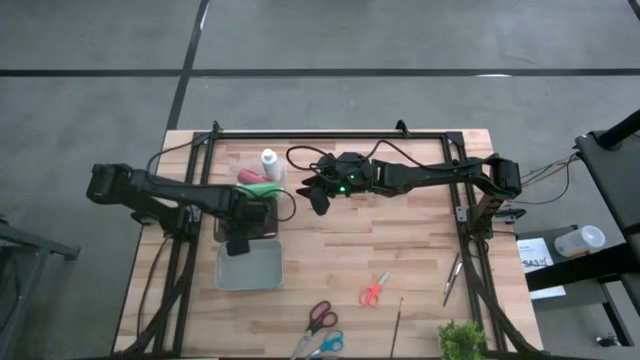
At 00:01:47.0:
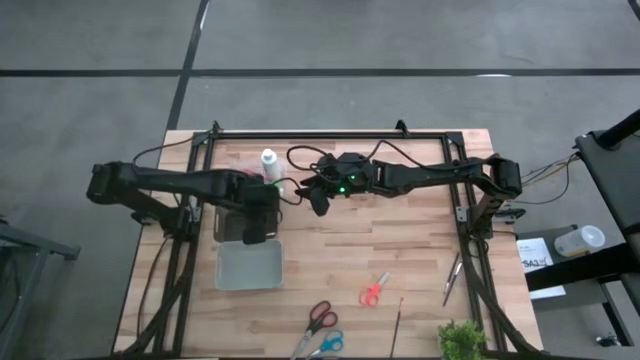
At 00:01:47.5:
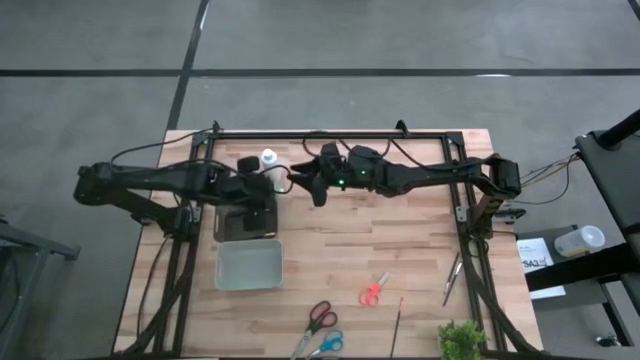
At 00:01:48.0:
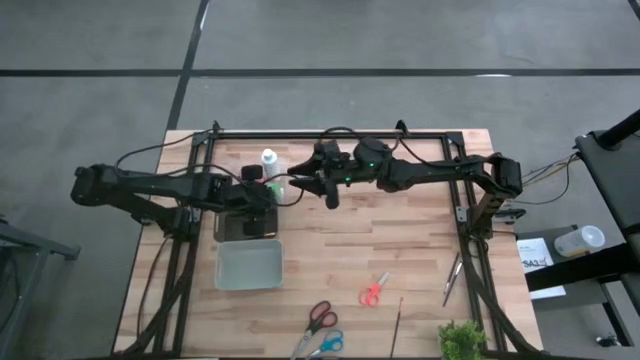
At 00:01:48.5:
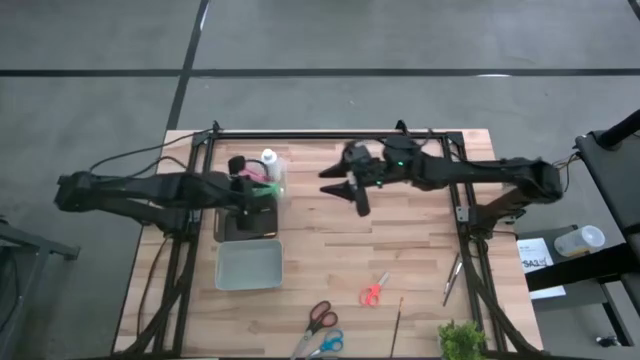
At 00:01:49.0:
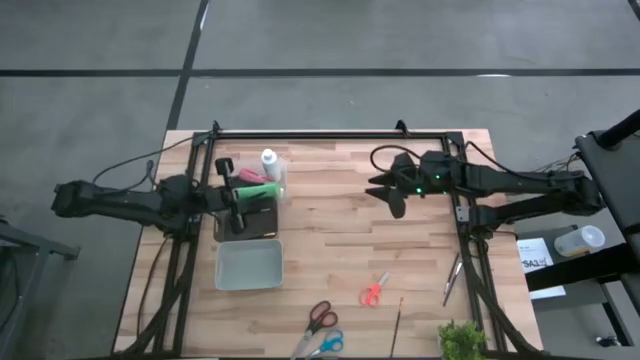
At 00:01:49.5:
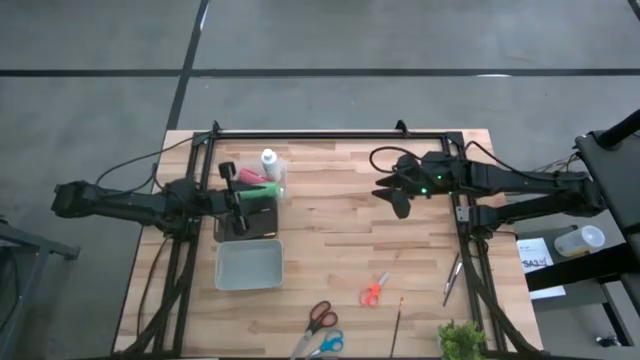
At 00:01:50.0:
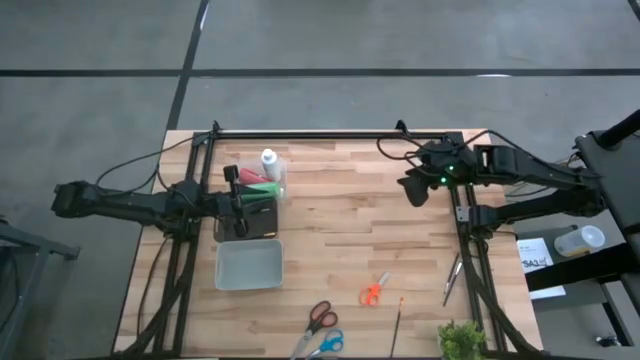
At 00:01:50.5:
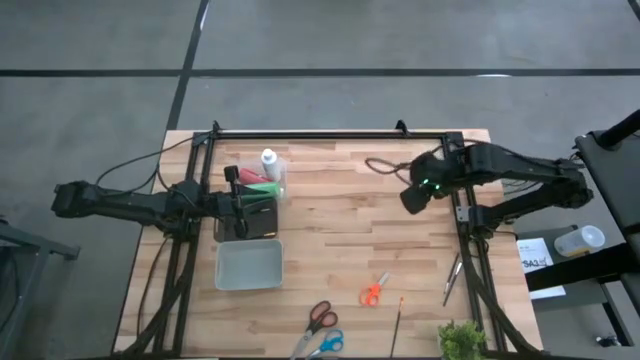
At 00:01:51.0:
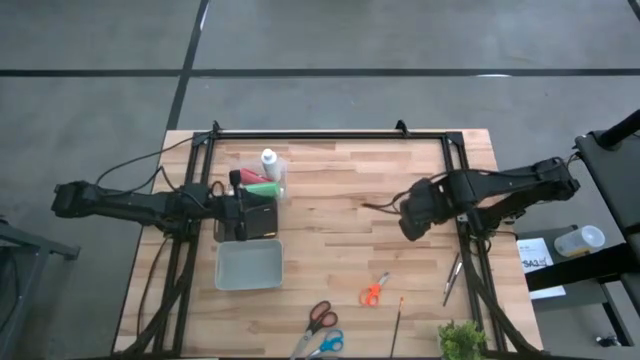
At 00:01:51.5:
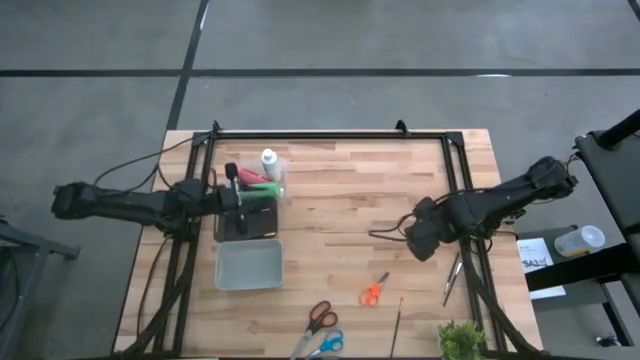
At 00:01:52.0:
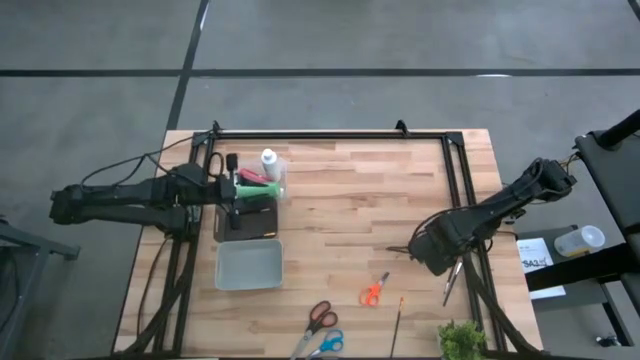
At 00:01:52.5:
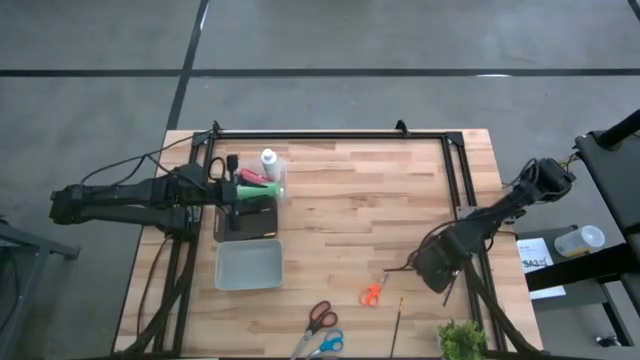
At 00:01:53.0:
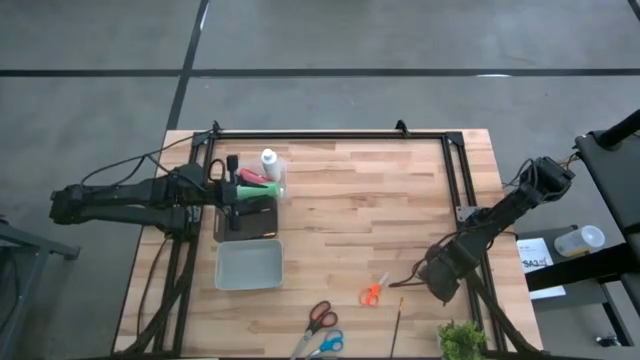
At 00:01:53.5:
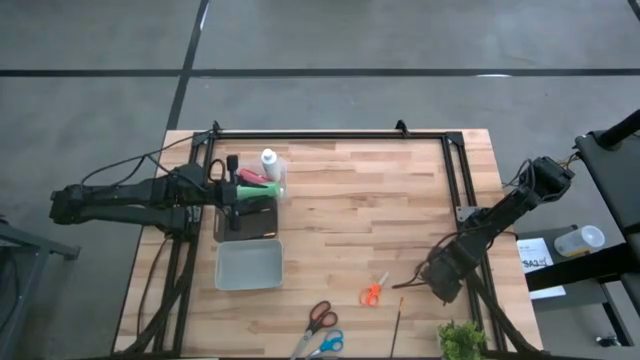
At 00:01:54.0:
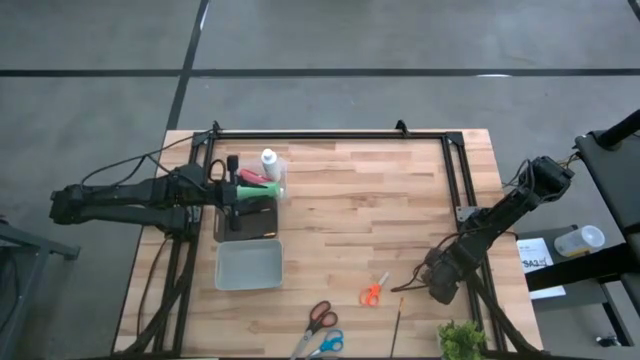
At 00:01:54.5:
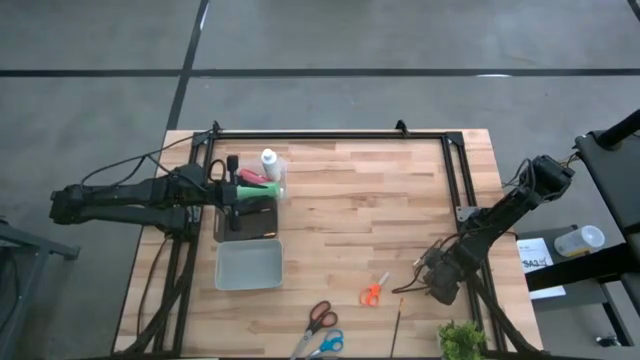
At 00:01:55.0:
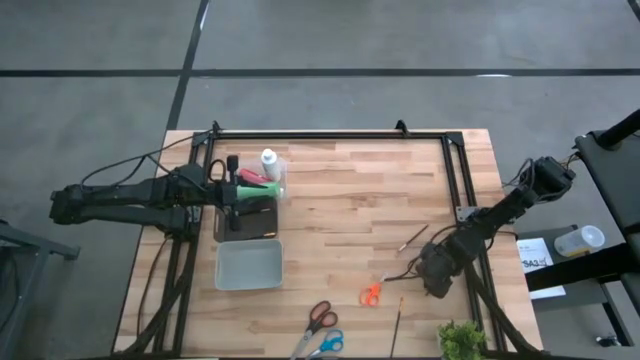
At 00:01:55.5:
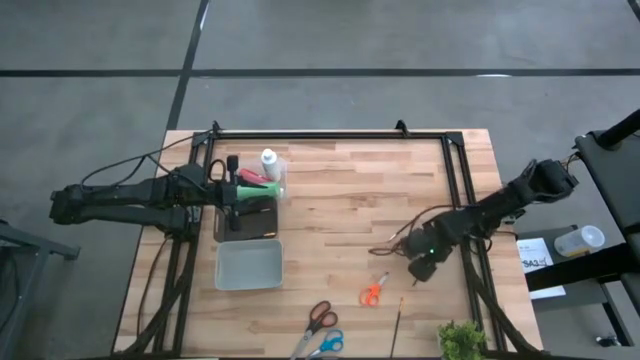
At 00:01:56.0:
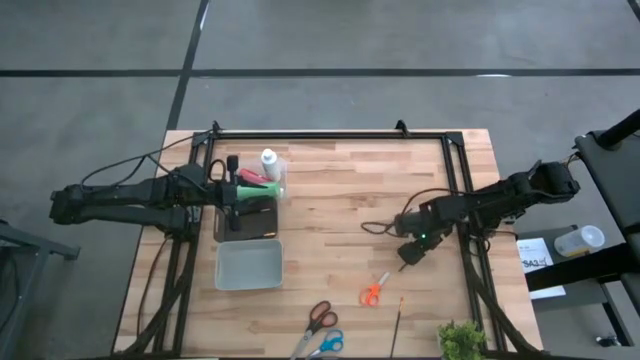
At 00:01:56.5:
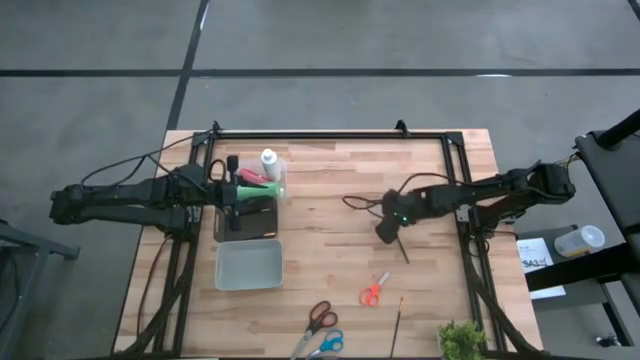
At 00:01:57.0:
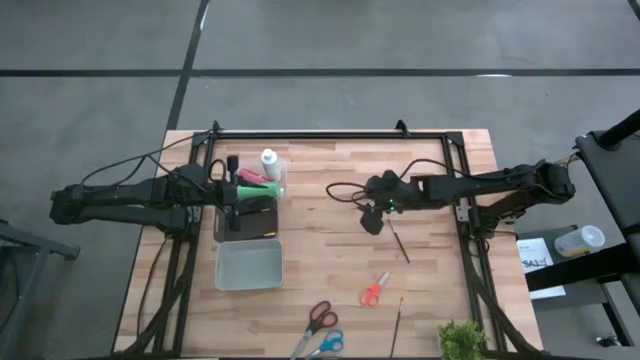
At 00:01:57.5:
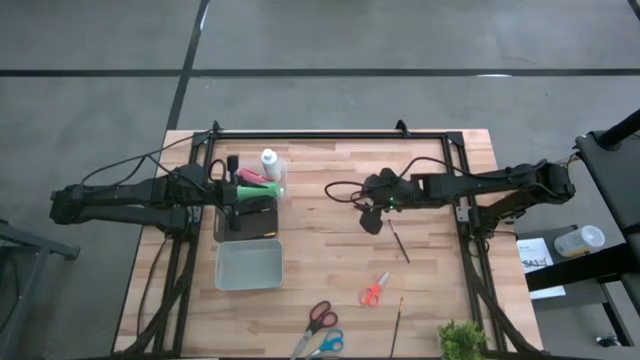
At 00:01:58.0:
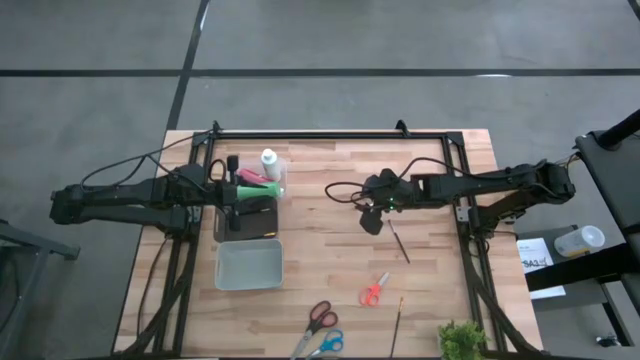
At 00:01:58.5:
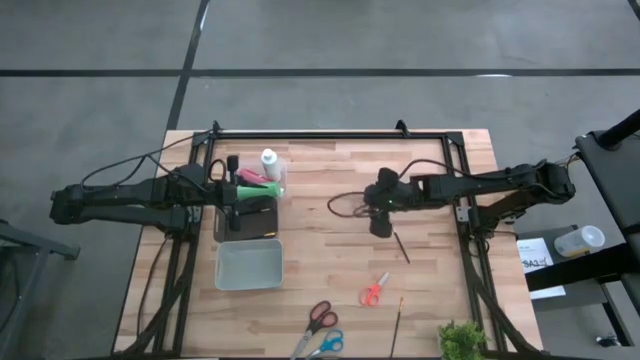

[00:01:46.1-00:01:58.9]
Task: Pick & Place Paint Supplies
Put the left silver makeup brush into the black bin

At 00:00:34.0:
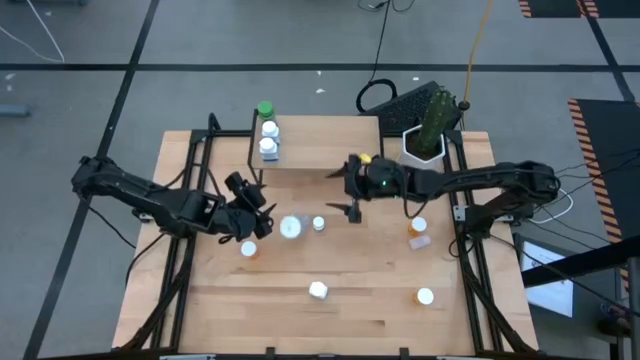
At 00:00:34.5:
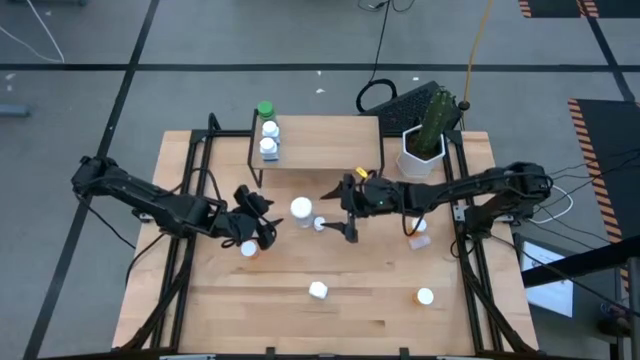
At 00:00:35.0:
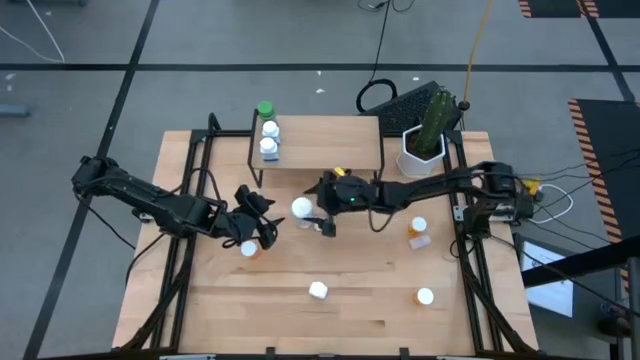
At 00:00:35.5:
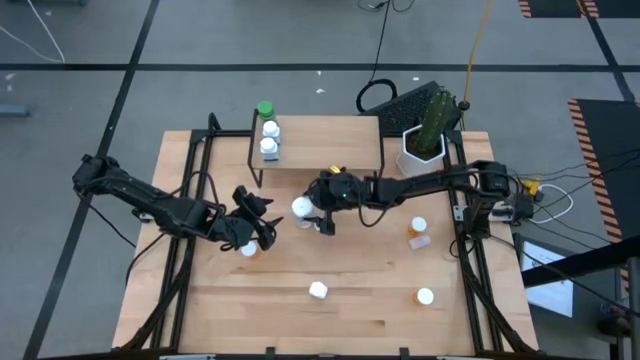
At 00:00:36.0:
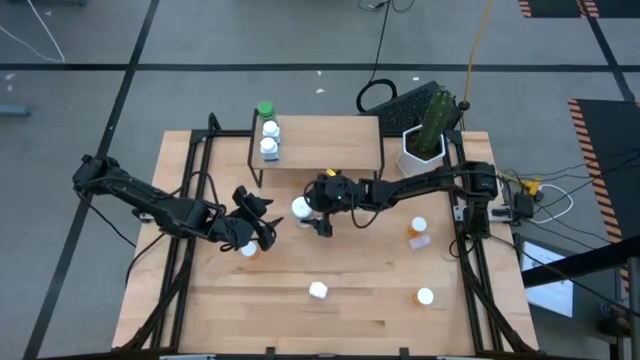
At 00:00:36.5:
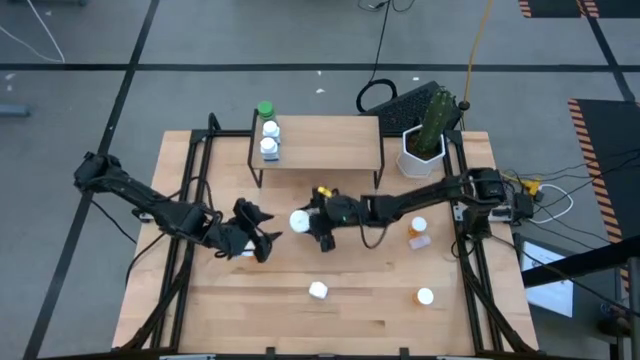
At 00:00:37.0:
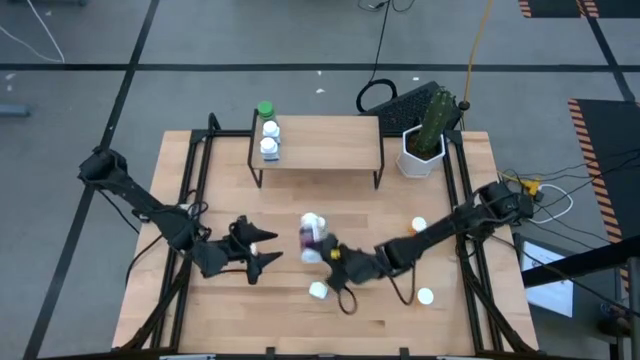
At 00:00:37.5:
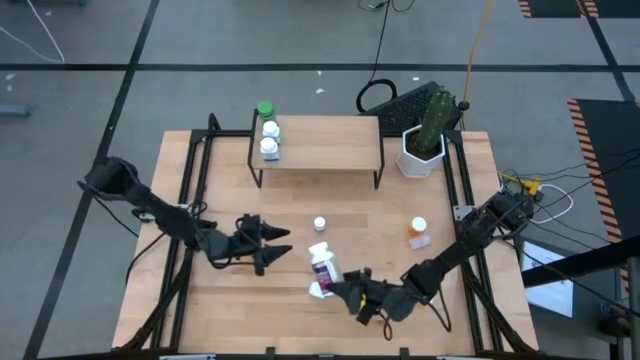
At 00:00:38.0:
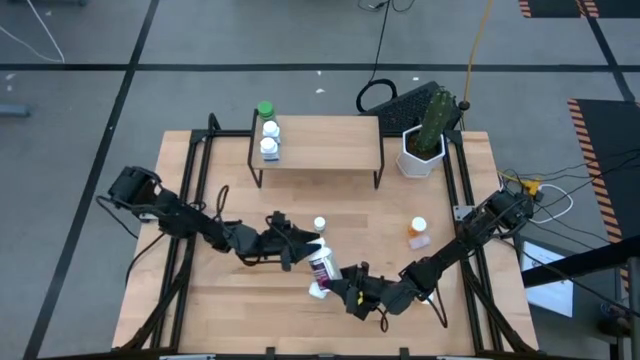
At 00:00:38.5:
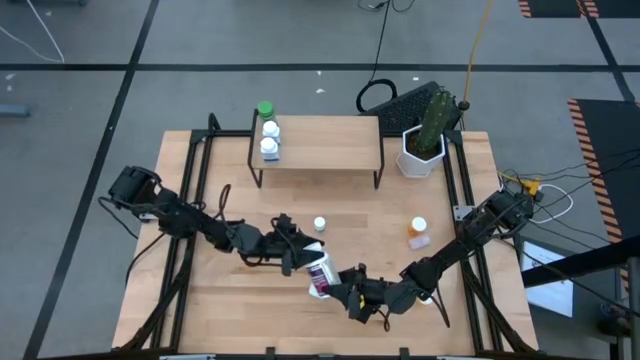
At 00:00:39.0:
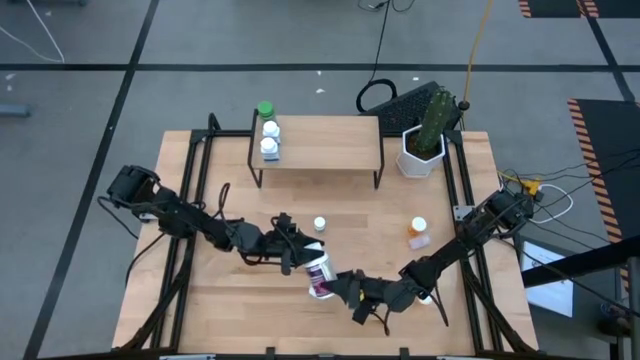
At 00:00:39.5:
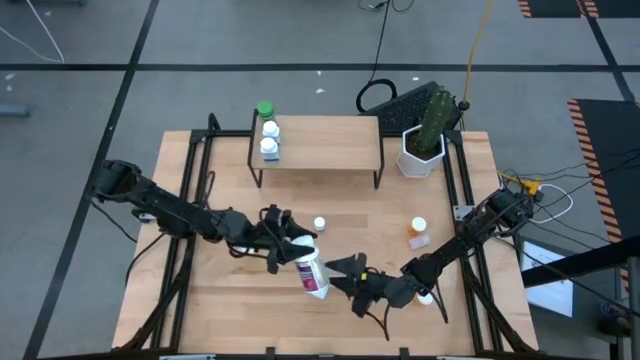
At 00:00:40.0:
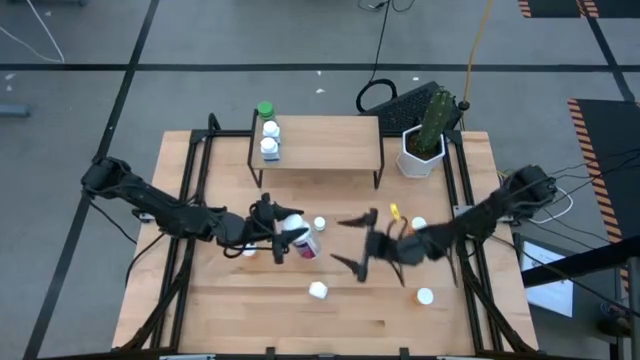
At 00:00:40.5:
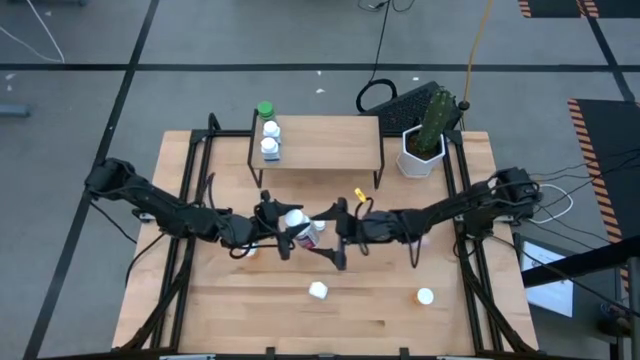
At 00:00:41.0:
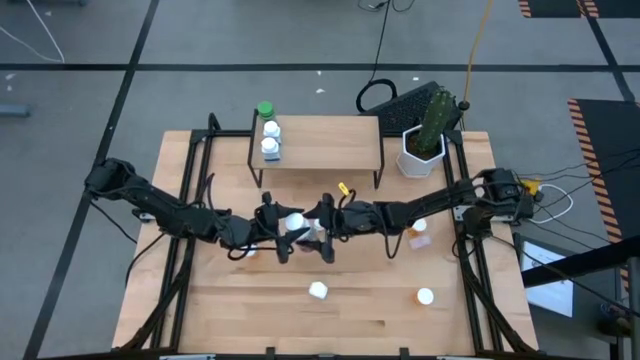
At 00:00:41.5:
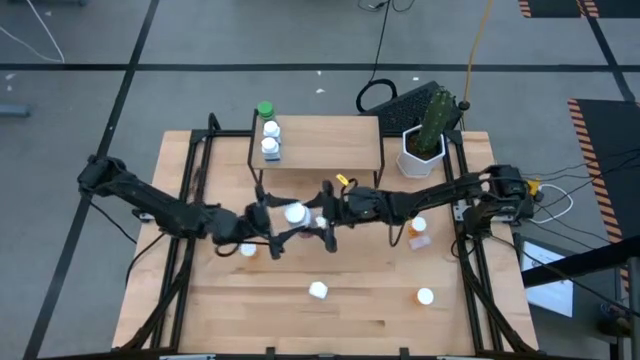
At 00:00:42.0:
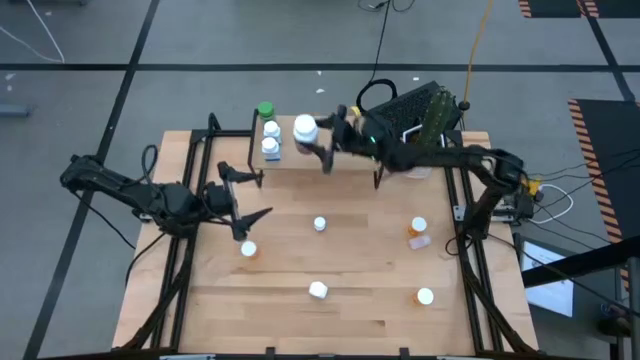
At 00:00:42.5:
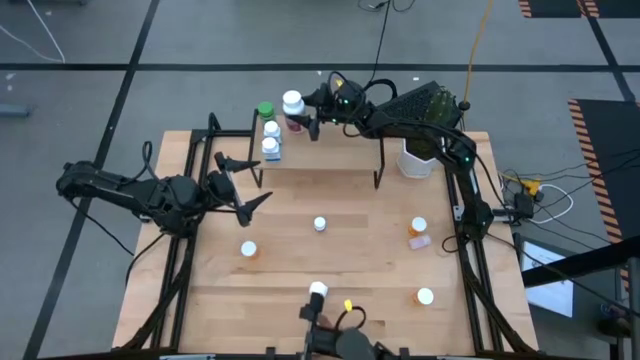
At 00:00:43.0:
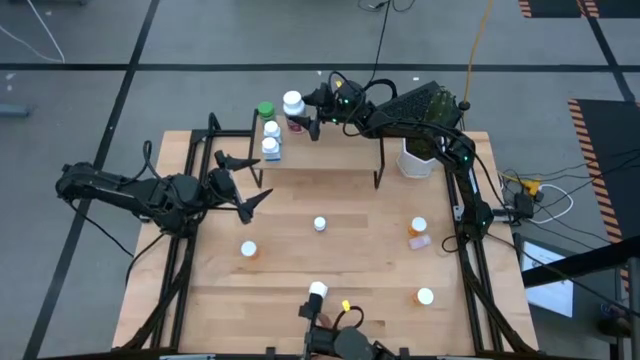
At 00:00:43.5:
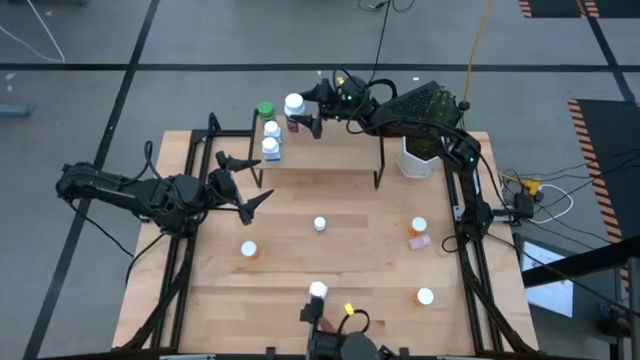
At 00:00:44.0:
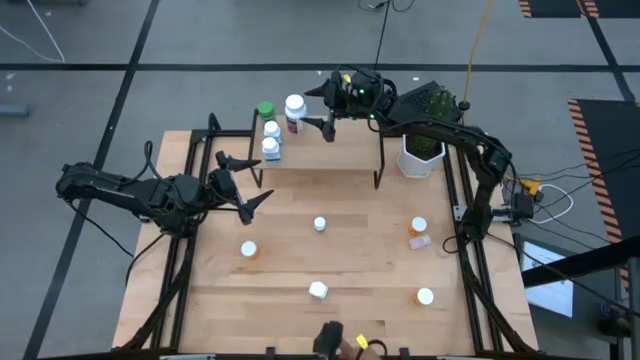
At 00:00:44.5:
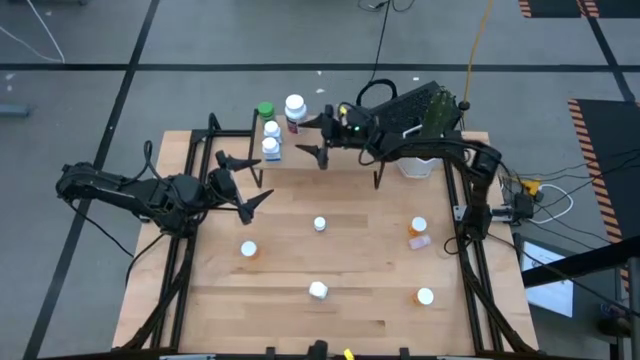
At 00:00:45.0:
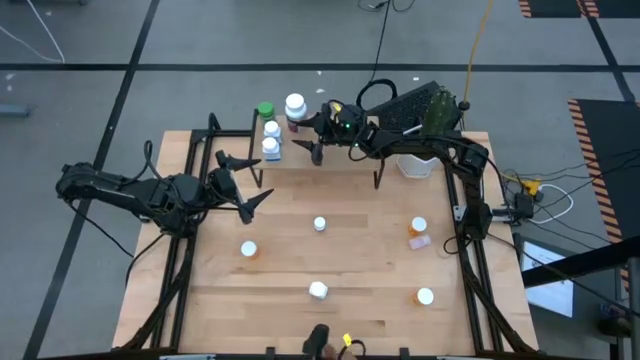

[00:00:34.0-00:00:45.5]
Task: Pick and place medicine bottles onto shelf by color
Put the bottom left white medicine bottle on the shelf
